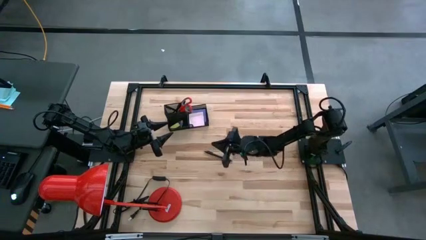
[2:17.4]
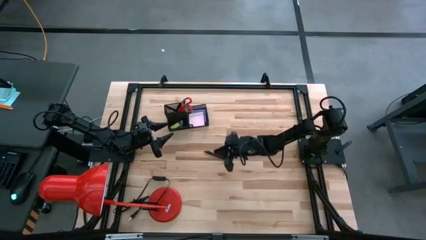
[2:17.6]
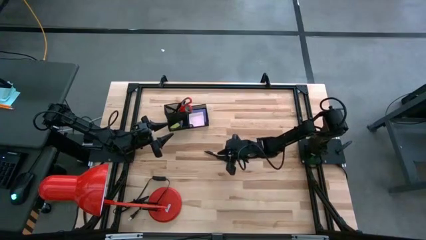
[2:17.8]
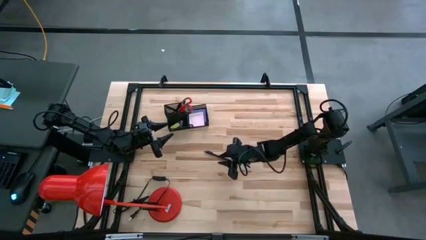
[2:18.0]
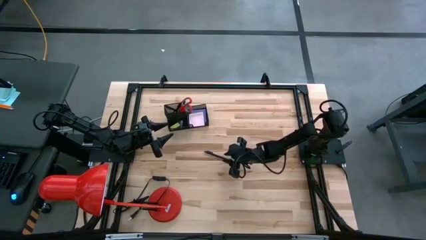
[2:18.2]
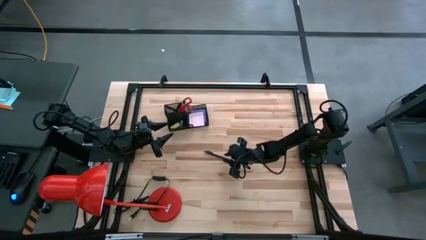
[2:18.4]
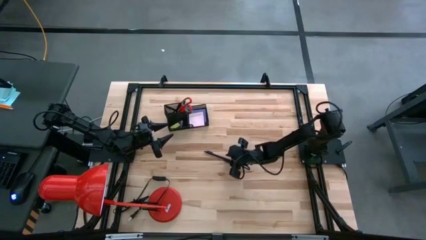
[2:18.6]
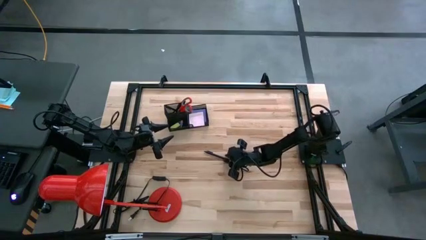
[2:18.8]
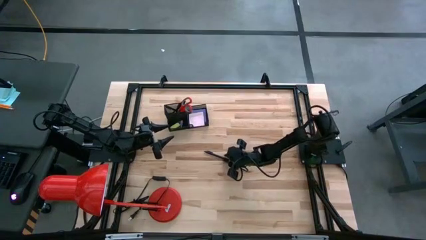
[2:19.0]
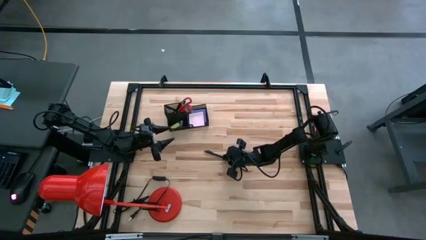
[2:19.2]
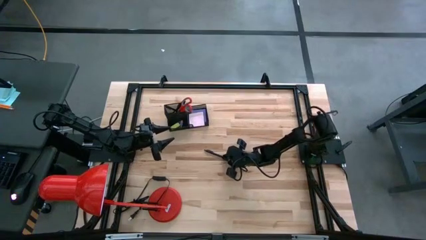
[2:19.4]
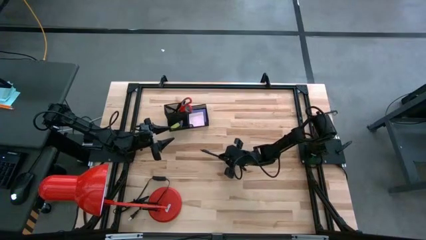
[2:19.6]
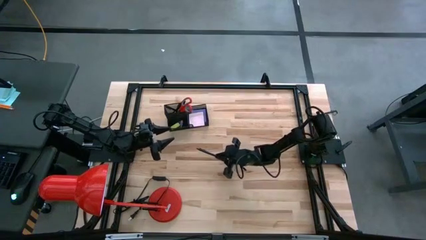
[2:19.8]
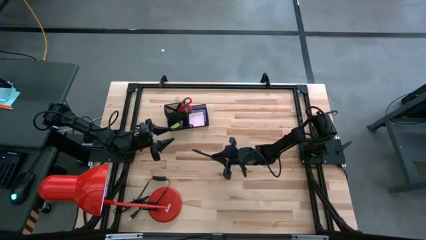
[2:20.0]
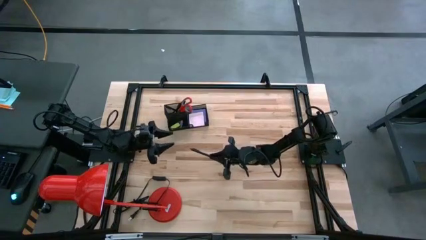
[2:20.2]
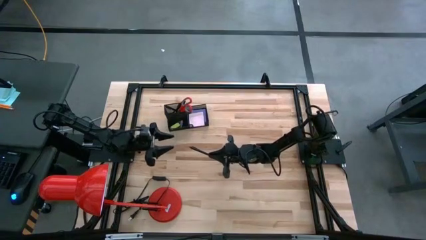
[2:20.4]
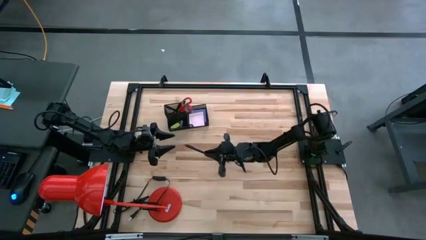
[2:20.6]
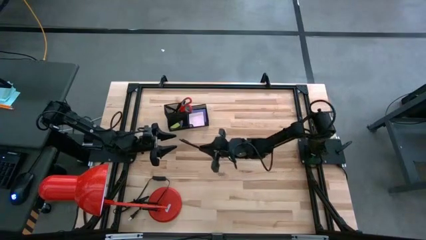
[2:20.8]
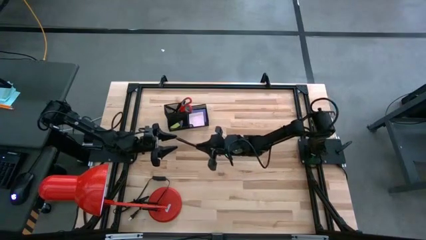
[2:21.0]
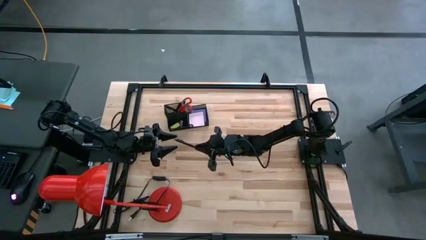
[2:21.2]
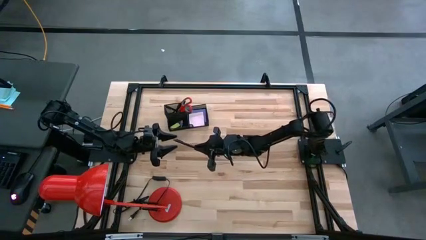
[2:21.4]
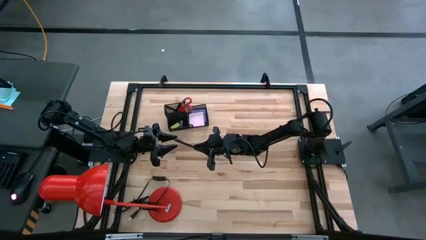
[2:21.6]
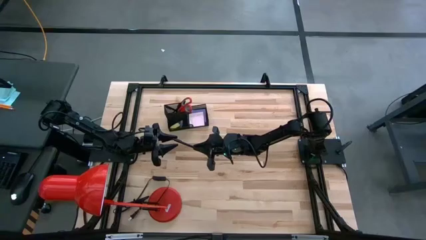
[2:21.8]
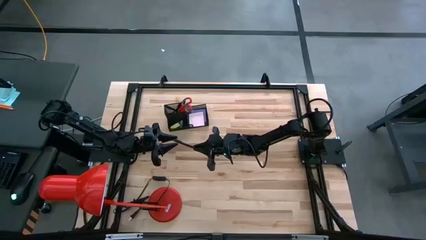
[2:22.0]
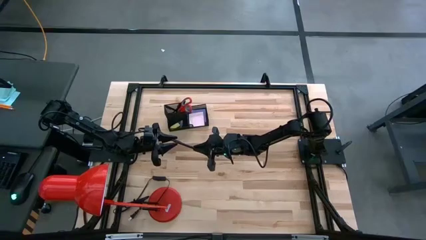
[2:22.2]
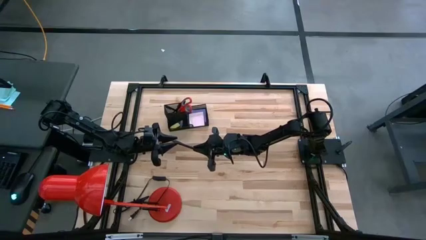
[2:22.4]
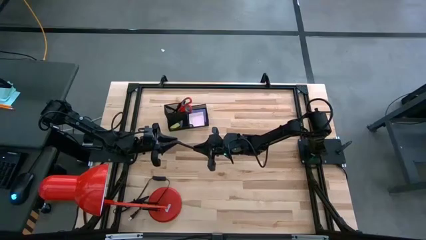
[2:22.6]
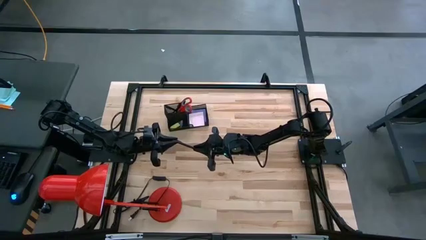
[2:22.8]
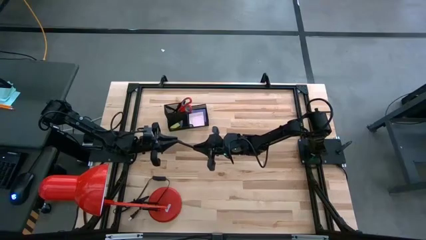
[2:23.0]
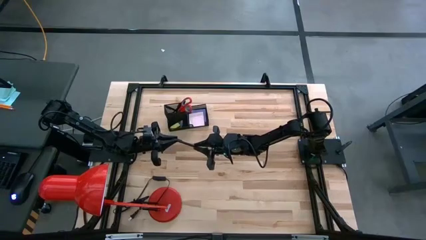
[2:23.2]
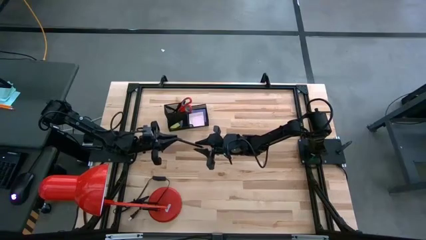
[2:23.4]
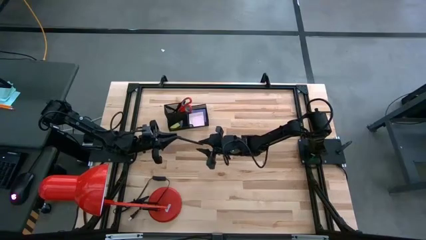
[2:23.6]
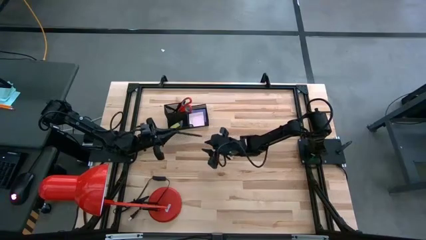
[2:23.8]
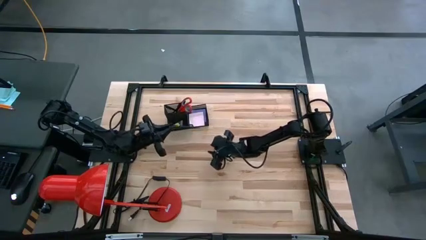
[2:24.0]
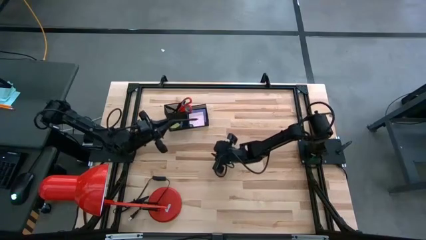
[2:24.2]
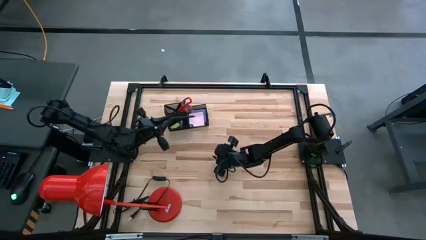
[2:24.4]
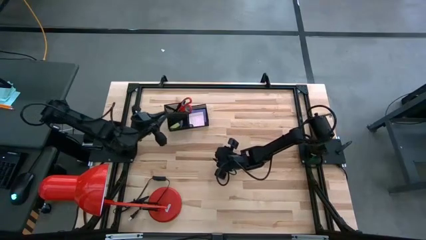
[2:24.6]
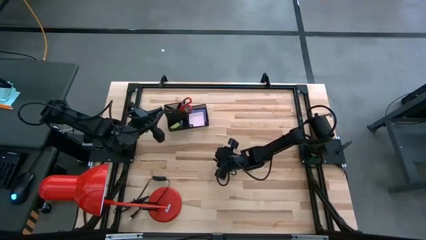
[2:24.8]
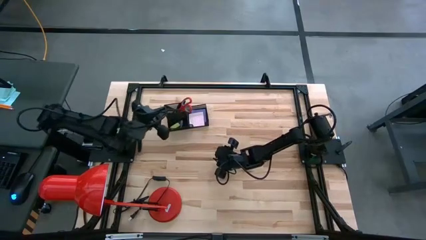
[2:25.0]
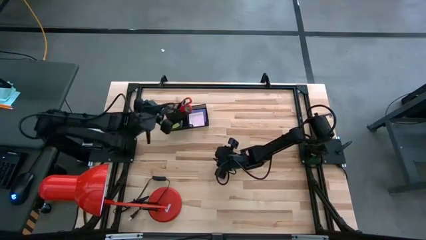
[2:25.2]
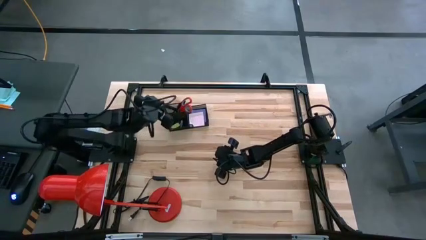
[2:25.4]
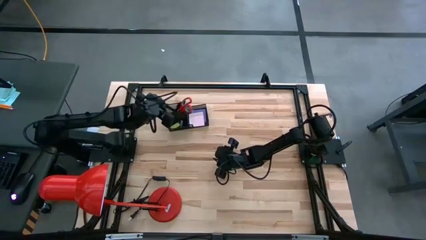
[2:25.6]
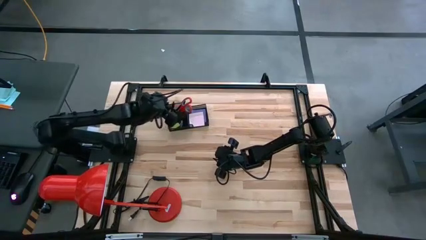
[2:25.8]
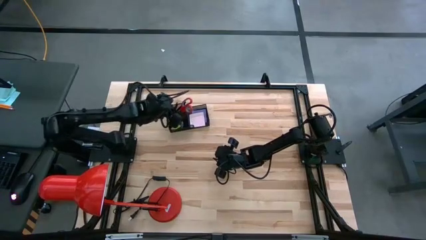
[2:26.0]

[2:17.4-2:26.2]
Task: Pick and place office supplies into organizer
Put the black pen into the desk organizer

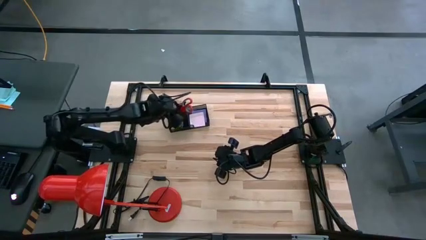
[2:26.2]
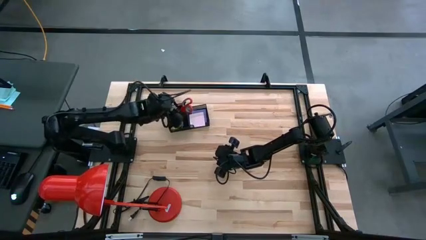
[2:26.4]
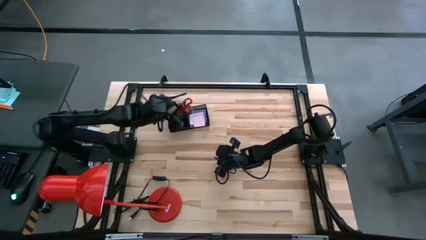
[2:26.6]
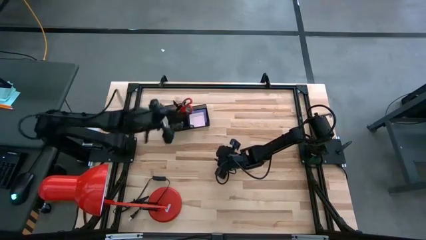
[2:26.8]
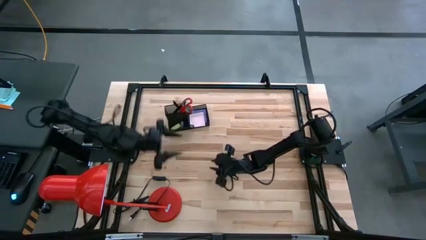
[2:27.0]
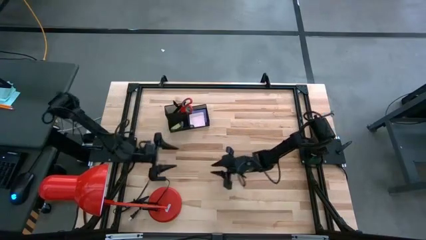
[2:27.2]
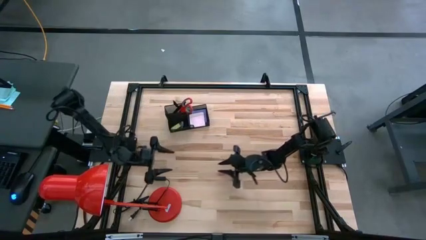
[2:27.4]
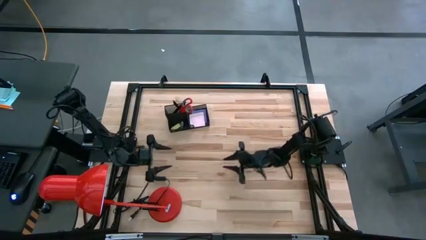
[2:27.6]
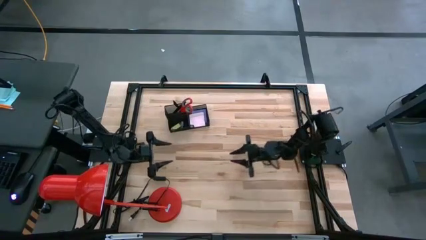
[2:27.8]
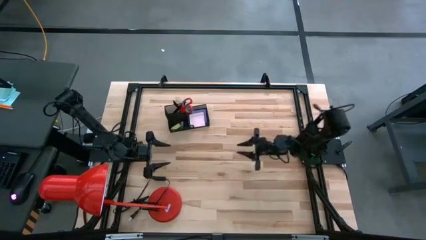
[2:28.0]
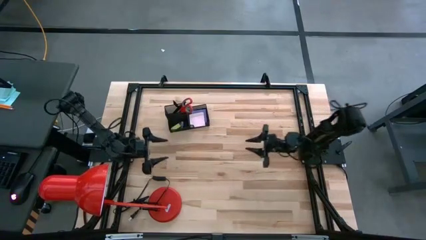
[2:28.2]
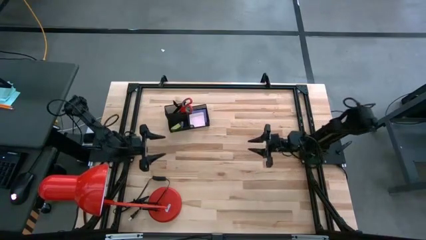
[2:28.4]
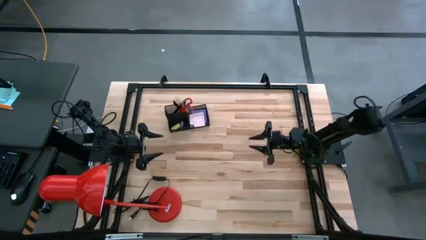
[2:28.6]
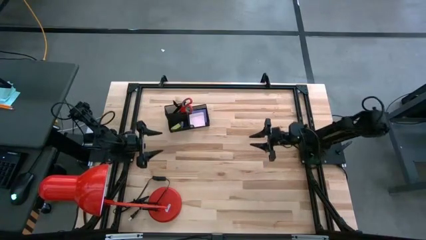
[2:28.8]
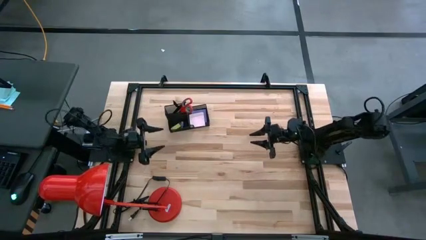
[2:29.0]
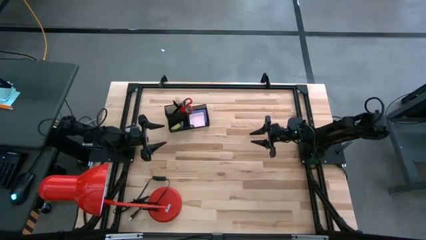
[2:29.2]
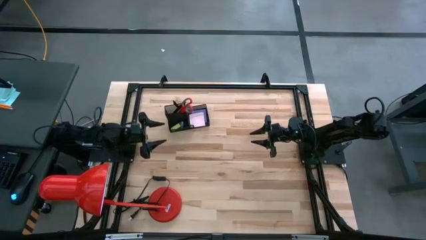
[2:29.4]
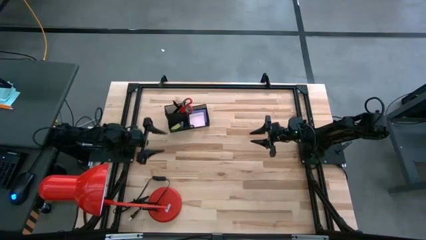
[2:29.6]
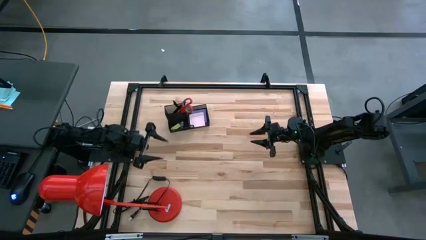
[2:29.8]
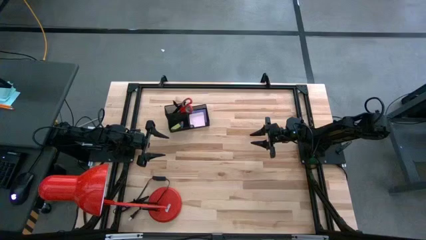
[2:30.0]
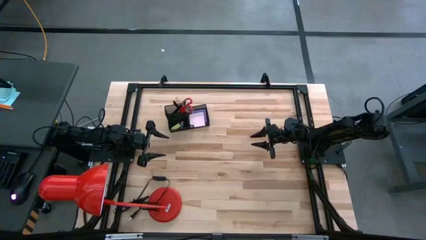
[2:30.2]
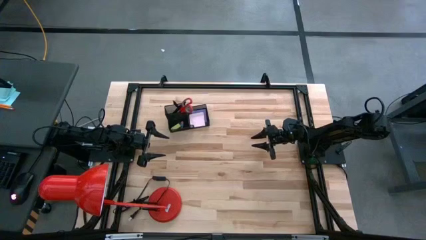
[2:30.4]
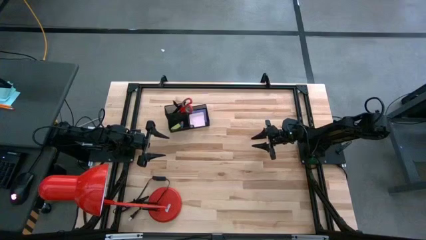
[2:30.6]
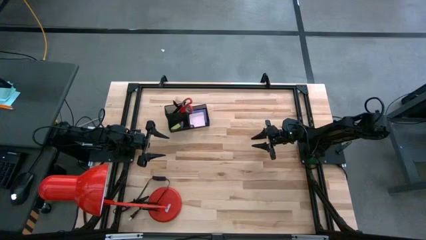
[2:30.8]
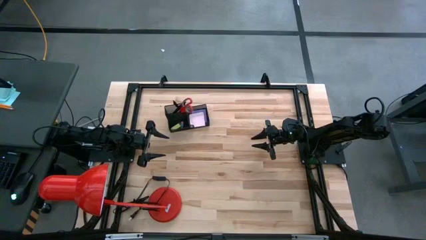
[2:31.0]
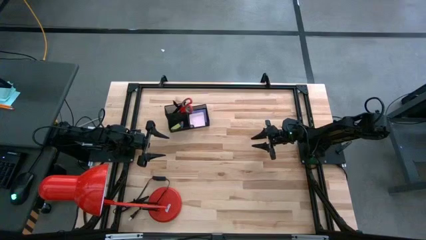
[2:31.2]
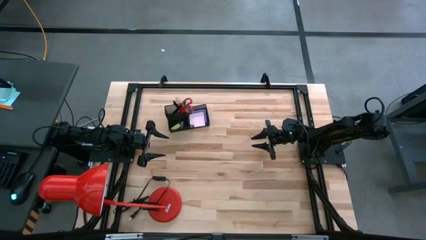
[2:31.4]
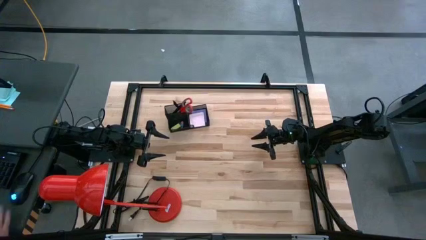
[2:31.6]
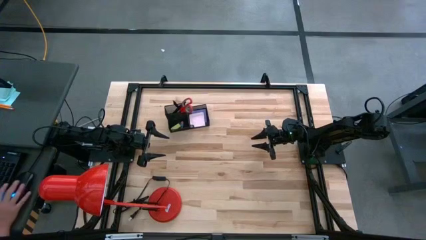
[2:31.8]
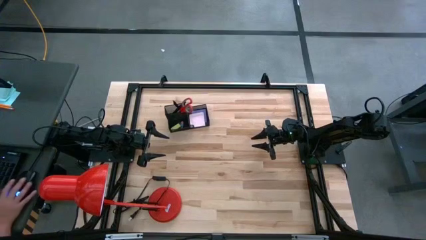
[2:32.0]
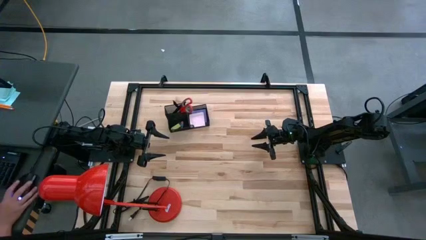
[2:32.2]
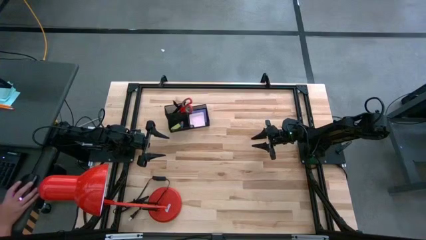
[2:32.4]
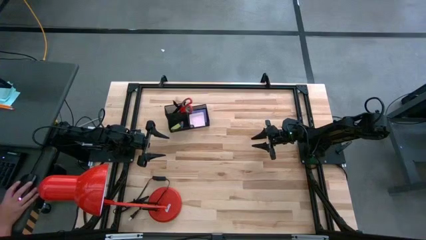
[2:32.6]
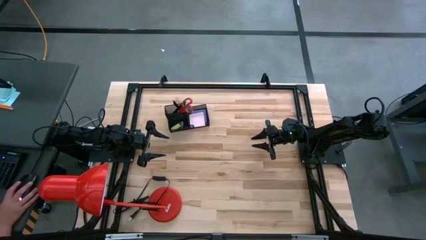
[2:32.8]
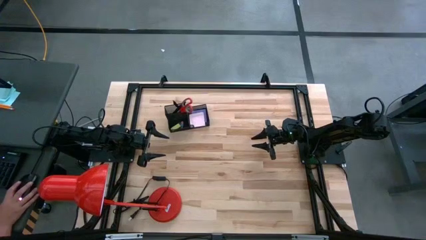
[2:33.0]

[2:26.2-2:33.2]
Return to Home Position

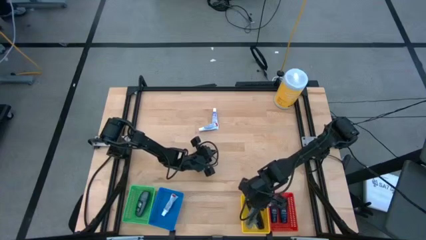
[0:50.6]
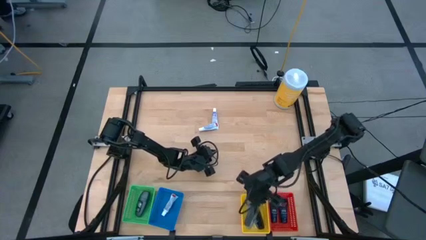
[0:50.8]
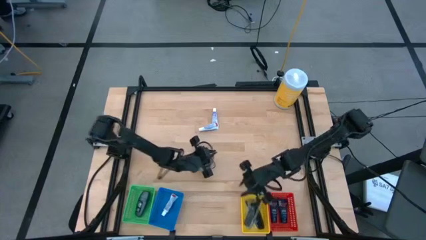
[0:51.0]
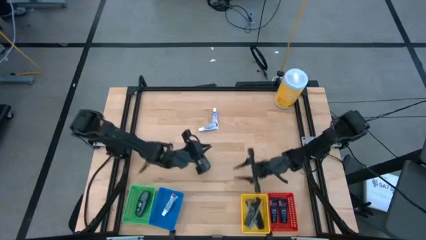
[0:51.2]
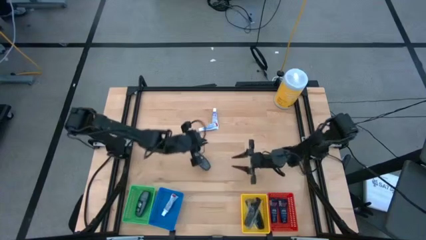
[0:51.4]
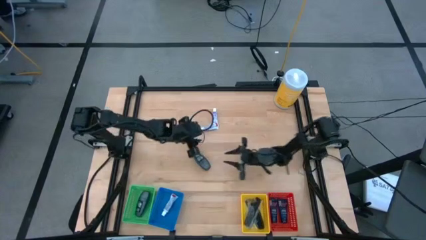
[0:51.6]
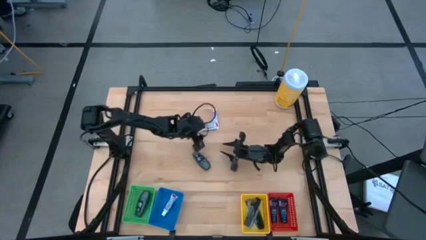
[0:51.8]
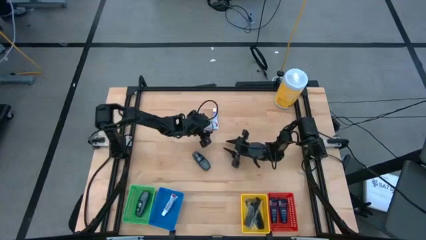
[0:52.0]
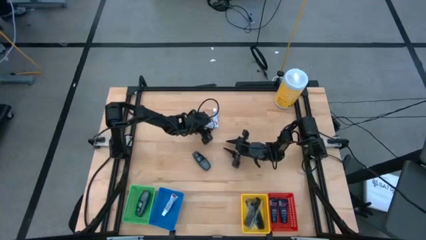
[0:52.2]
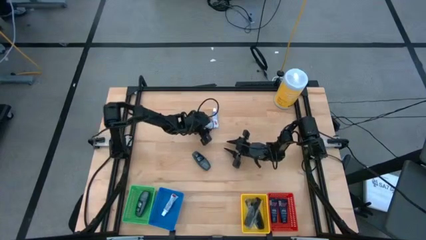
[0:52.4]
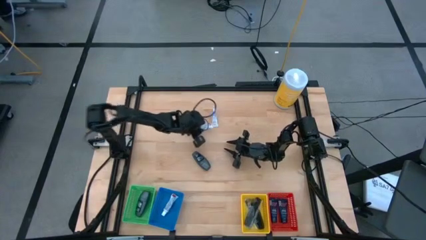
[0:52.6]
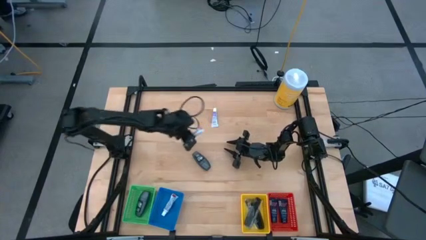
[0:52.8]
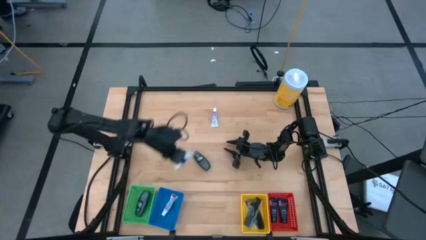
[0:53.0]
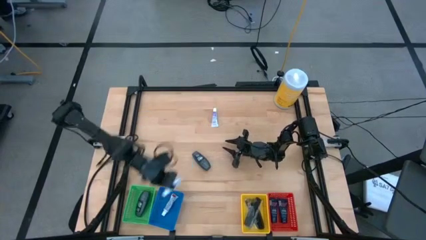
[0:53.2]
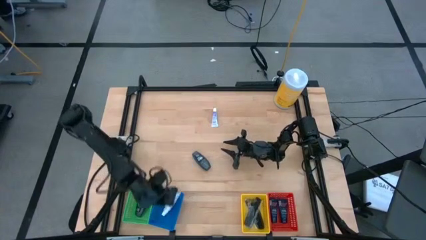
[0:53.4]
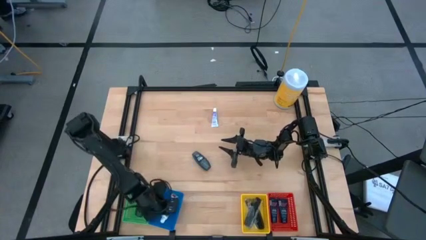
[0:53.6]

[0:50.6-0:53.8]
Task: Pick & Place Travel size toiletries
Put the white toothpaste into the blue bin
